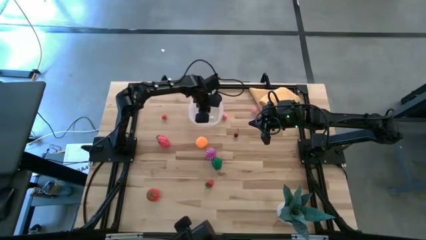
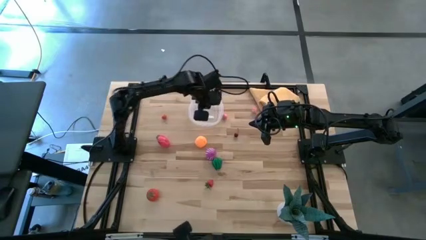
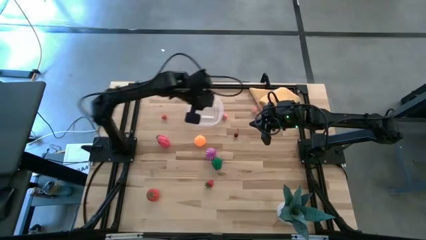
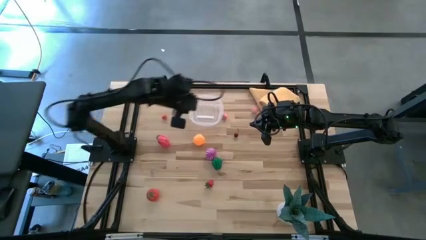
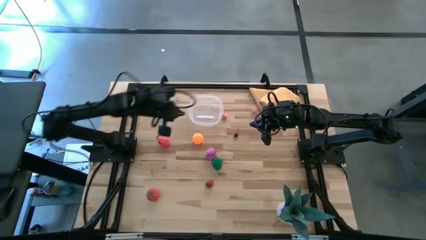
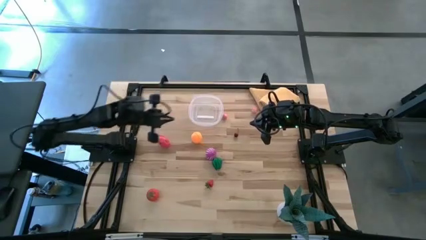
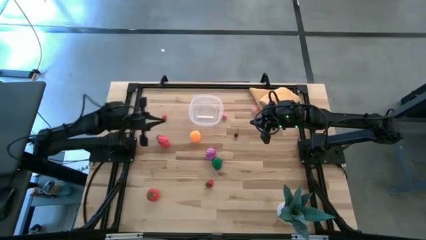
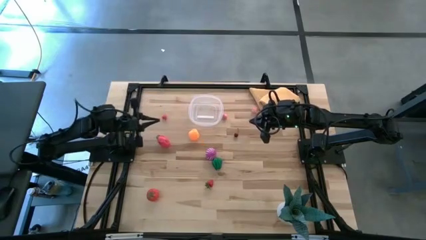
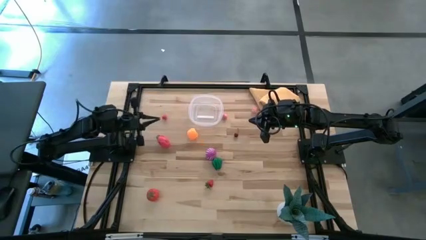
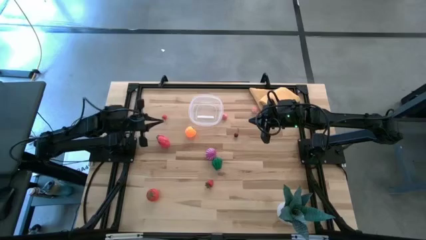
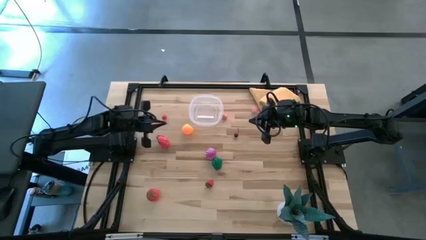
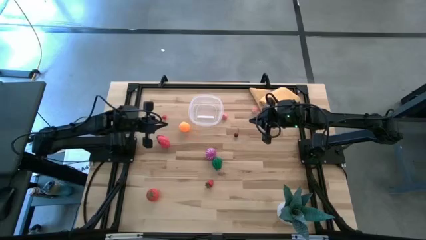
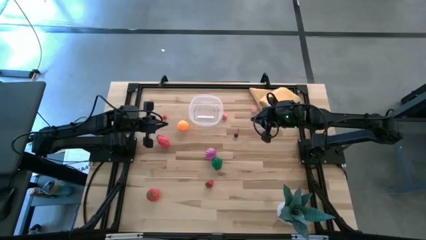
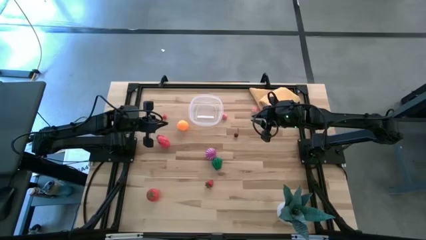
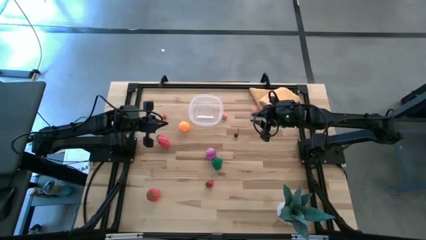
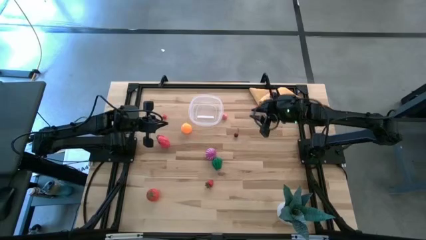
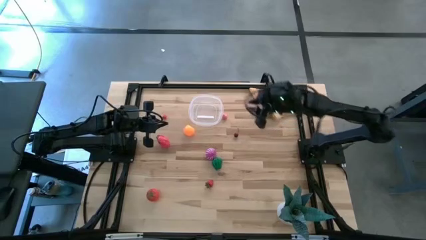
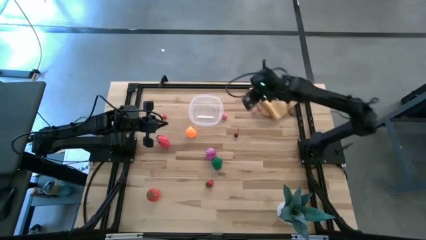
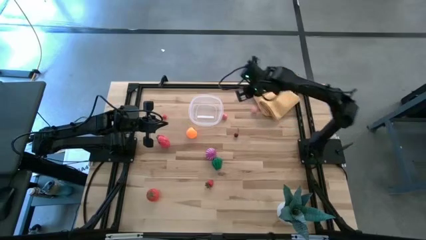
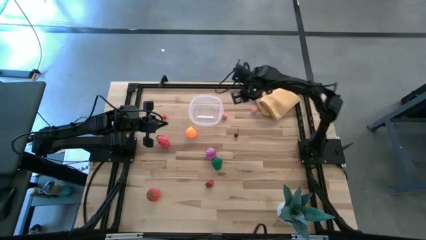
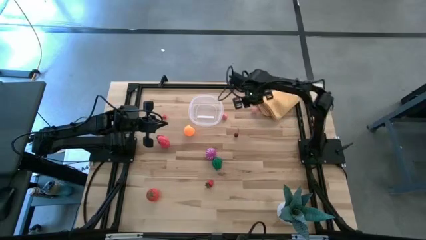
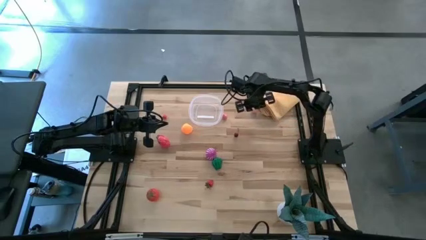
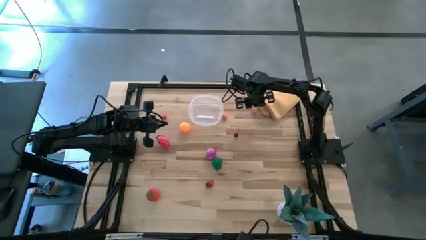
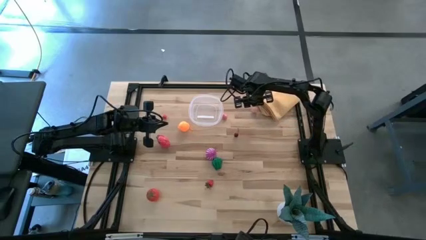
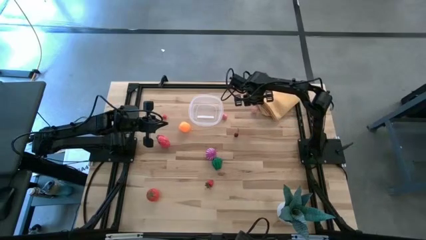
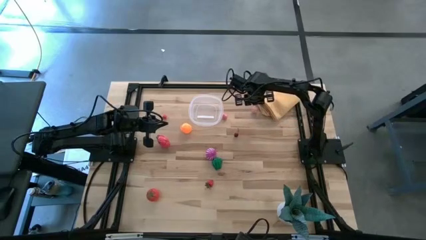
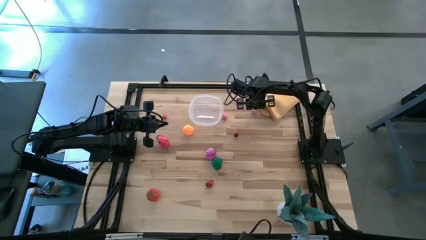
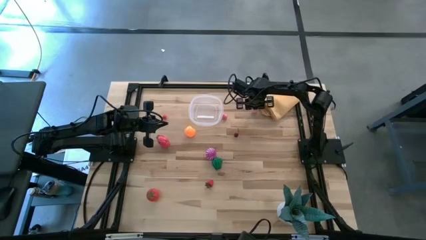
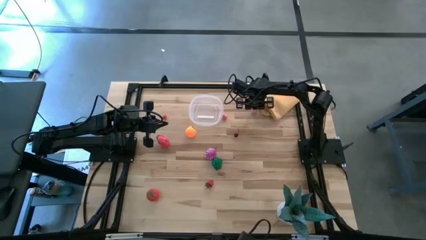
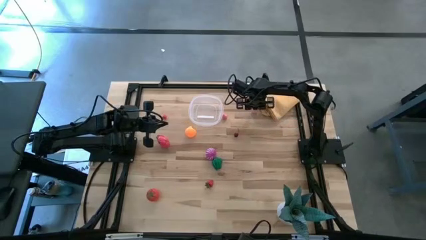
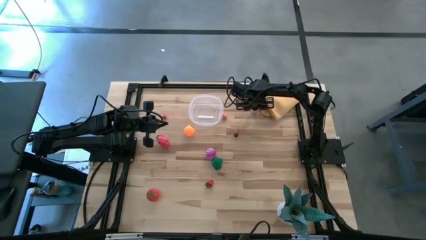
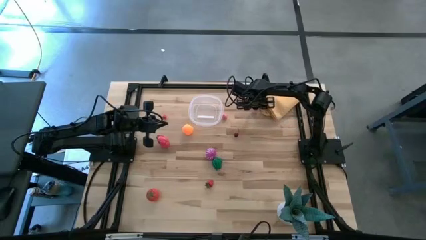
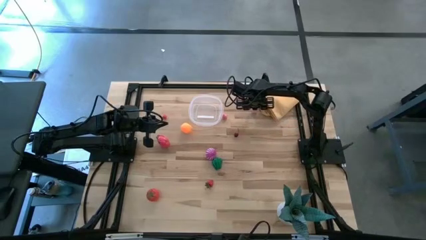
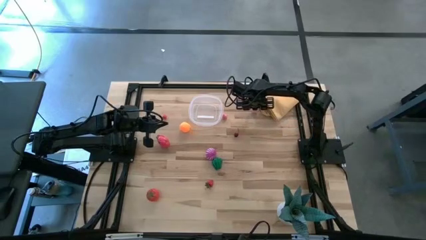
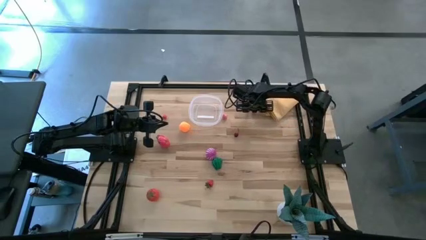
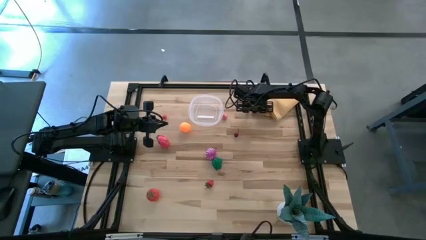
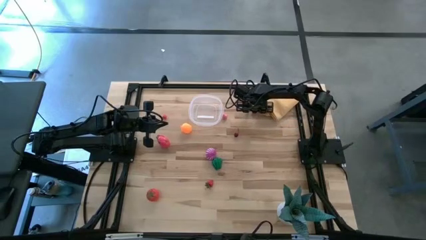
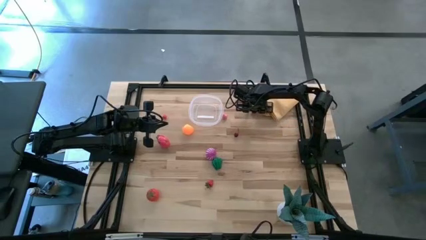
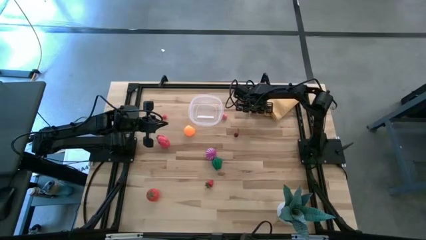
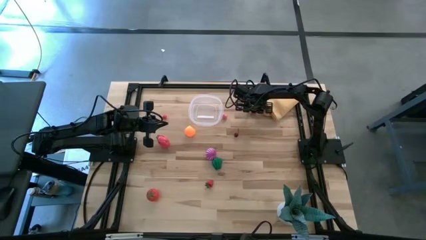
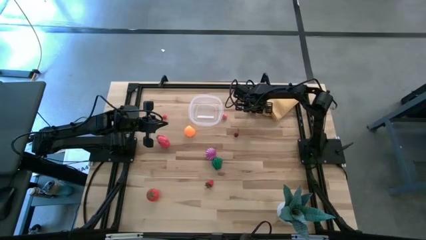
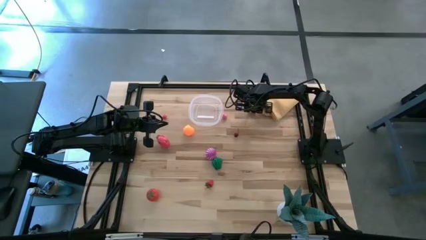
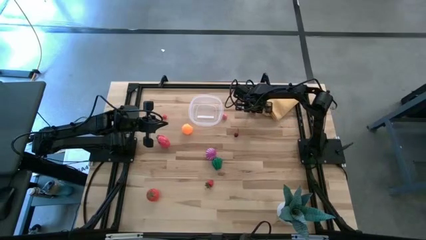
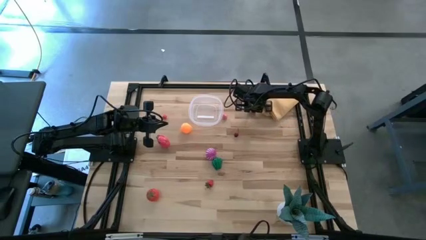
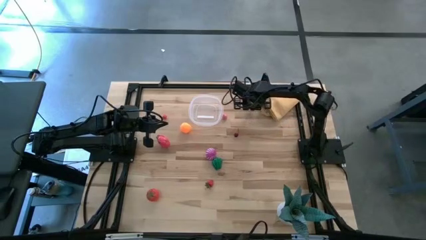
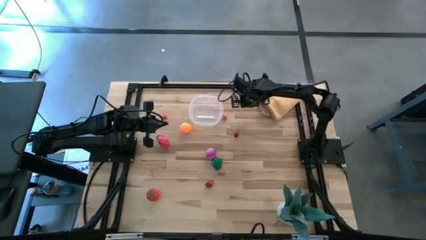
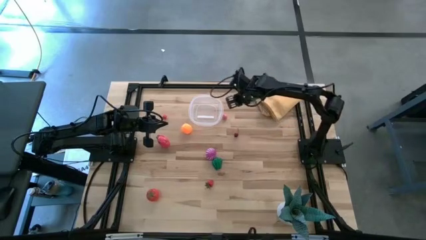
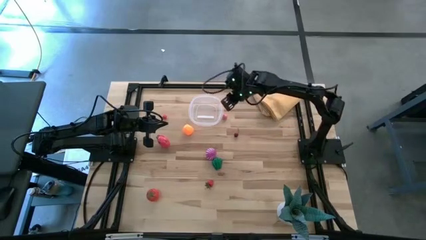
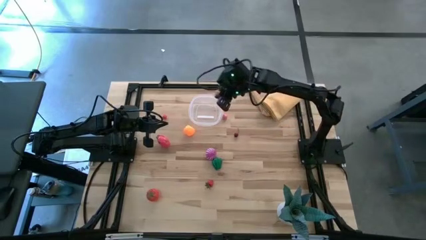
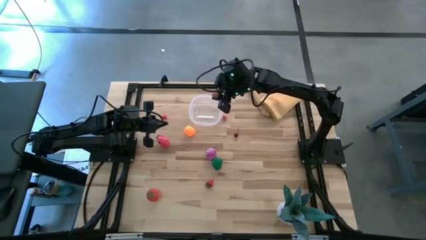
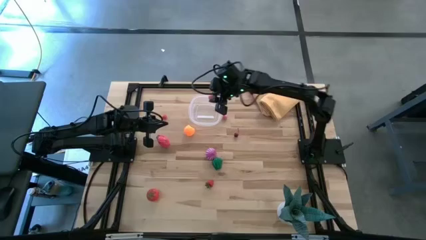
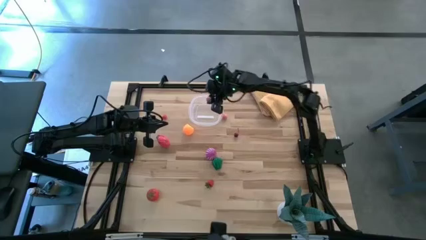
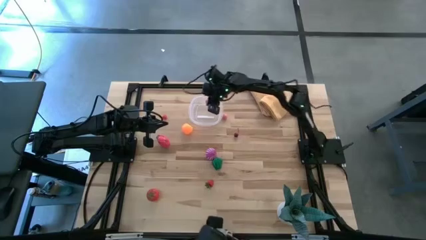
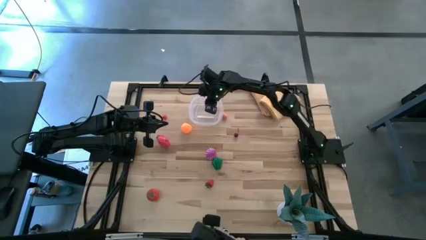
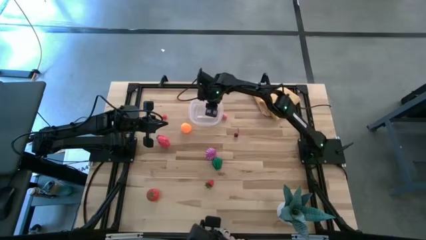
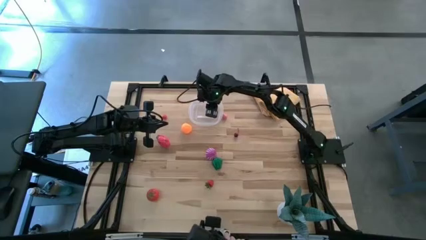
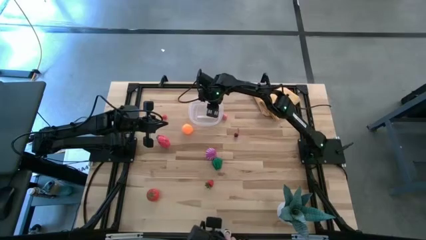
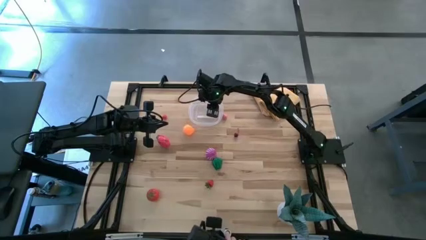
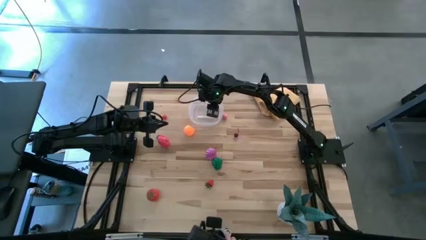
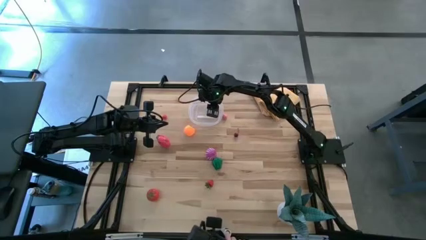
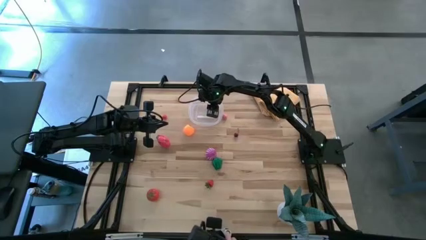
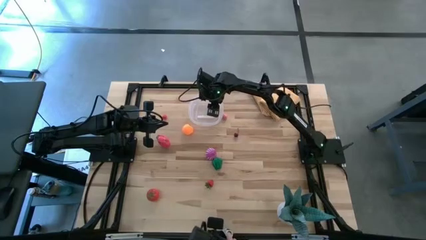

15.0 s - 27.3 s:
Task: Pick and placing Produce into tupperware
Put the right pink peach into the transparent bin

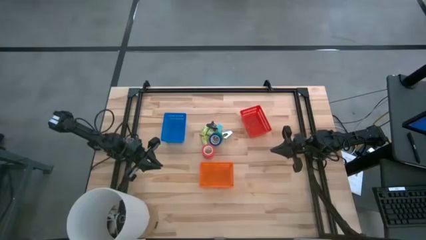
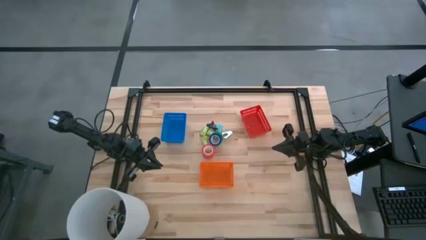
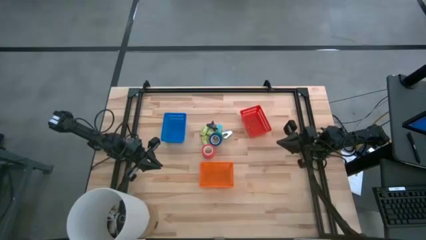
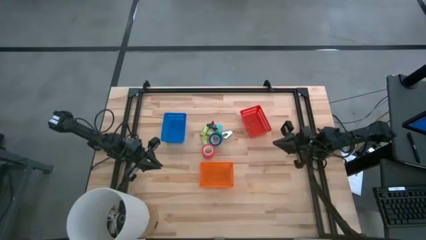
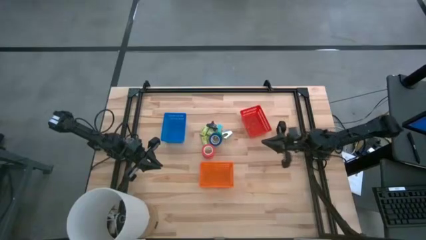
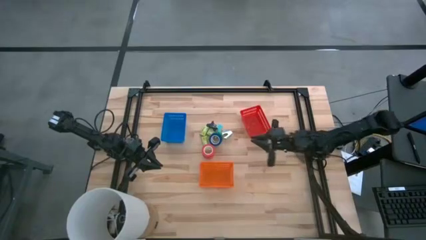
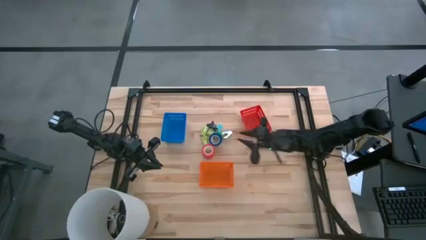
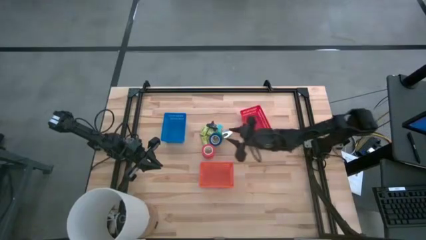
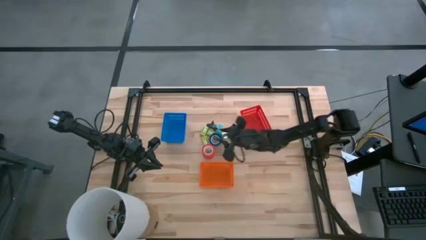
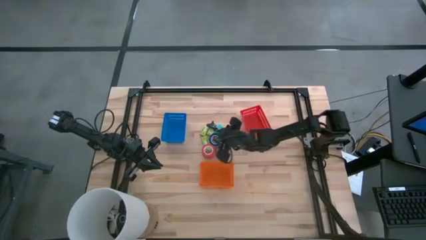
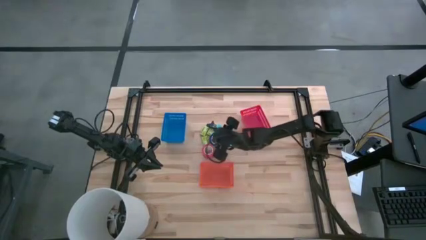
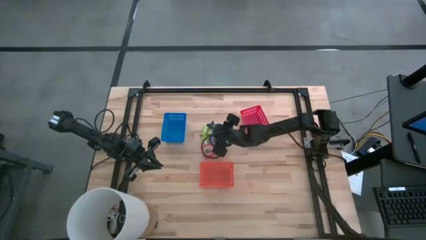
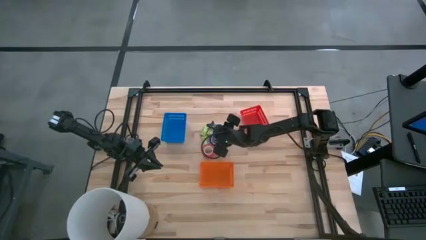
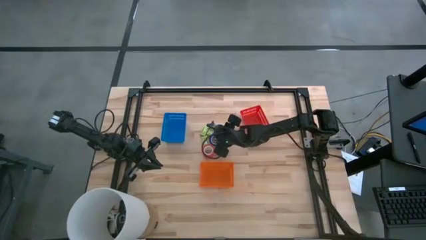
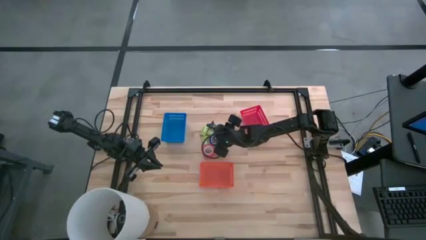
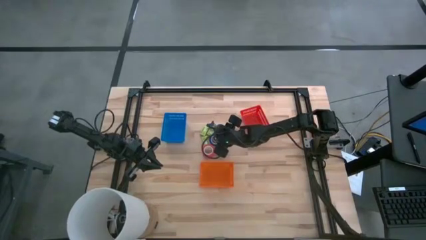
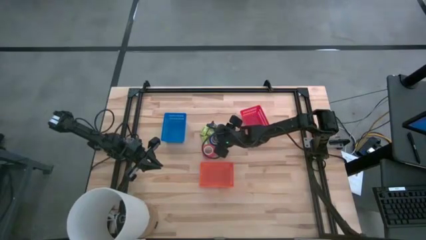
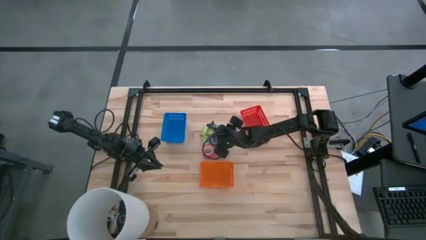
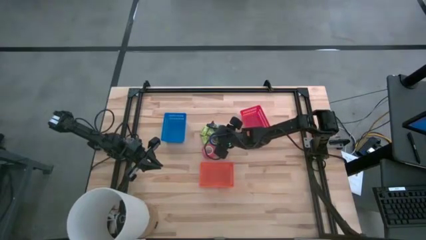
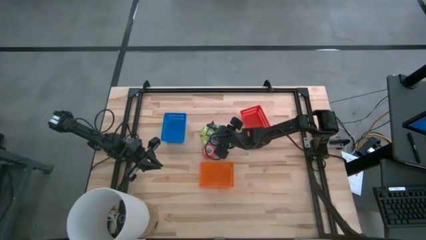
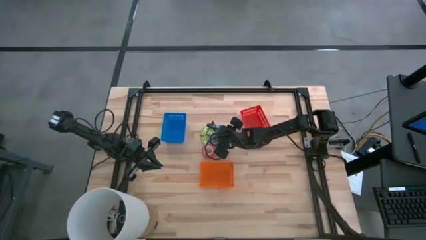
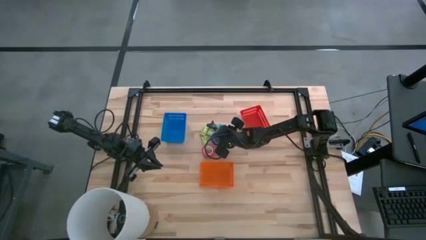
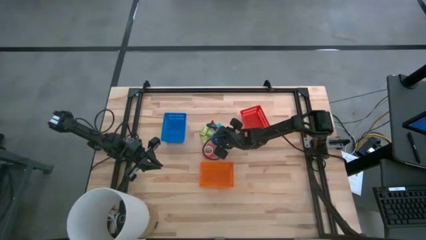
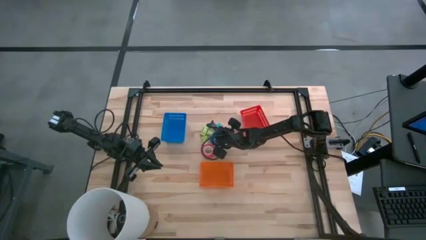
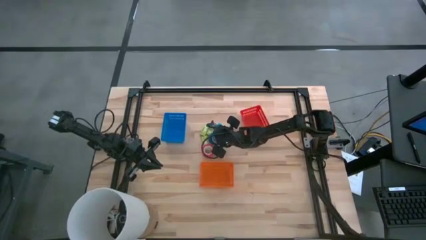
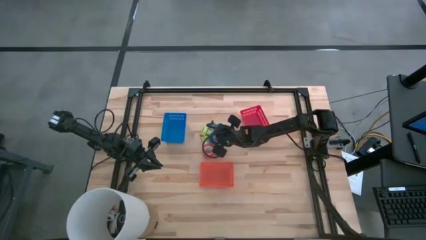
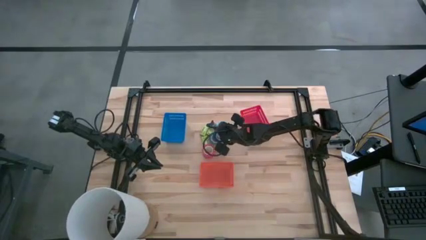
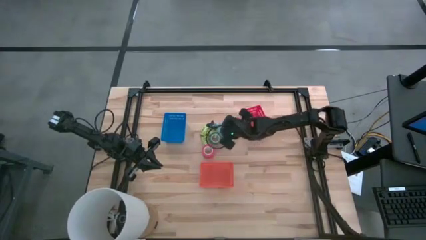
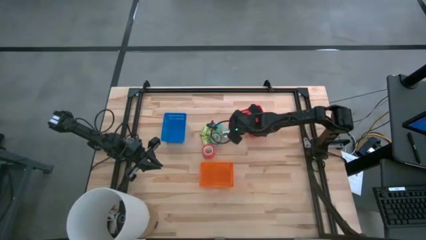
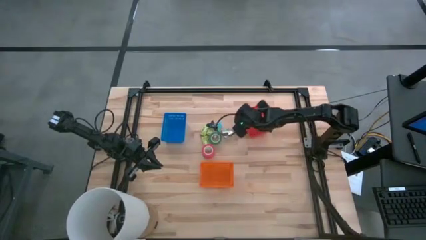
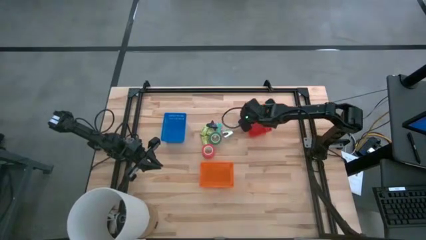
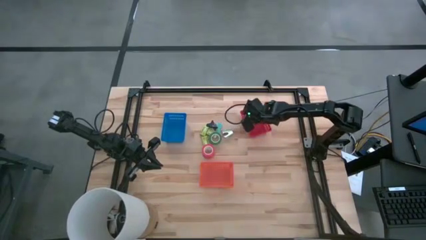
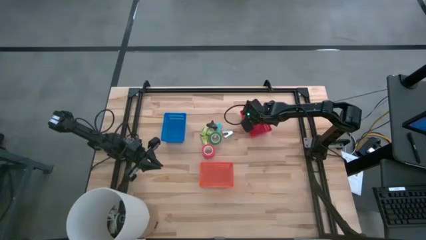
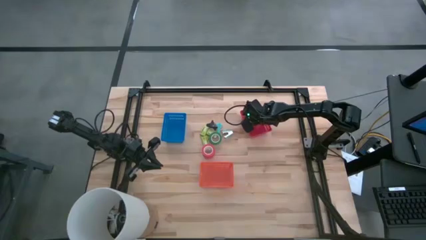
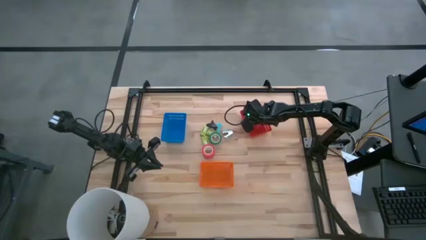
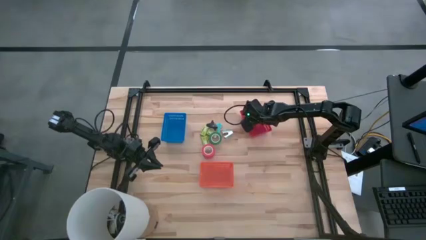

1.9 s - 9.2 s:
Task: Pick and place Stapler, Stapler remover, tape
Put the blue tape into the red basket
